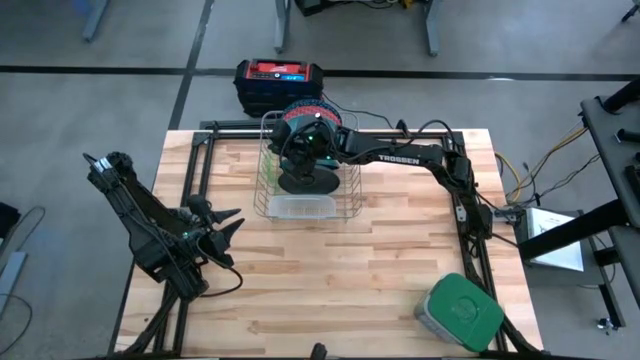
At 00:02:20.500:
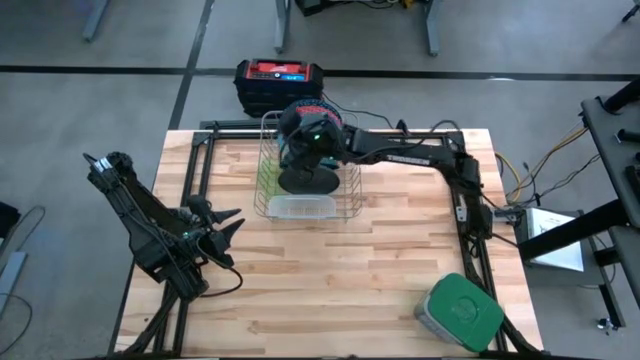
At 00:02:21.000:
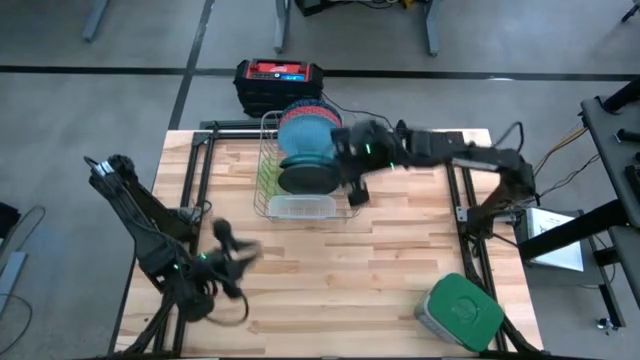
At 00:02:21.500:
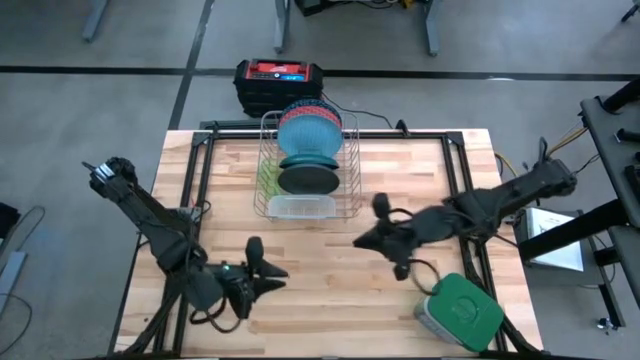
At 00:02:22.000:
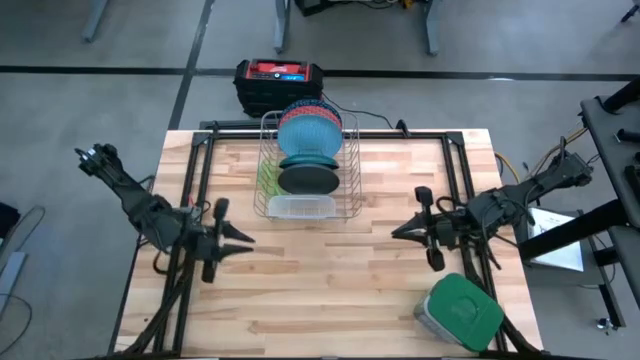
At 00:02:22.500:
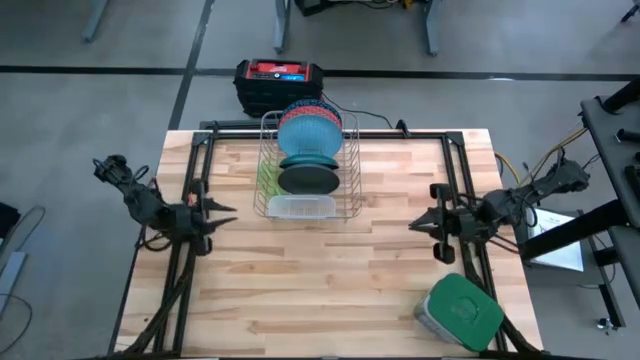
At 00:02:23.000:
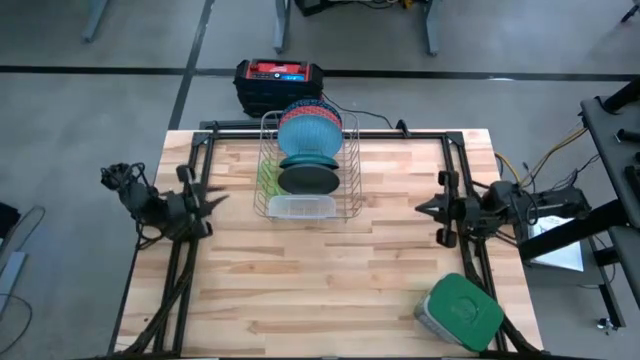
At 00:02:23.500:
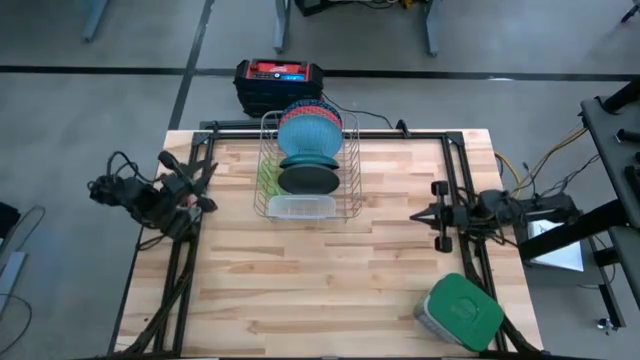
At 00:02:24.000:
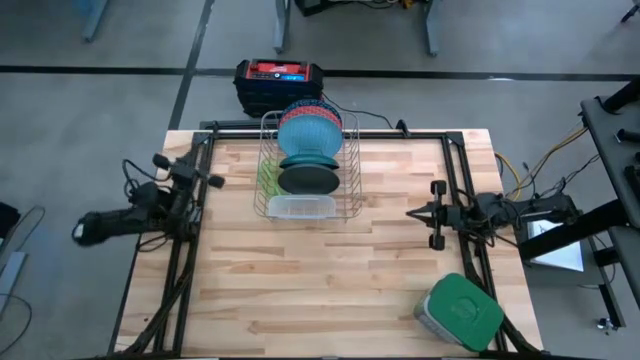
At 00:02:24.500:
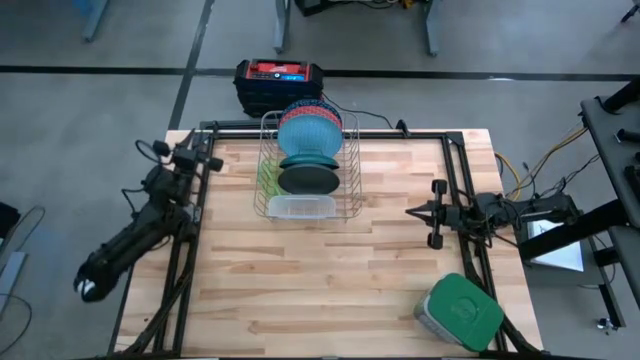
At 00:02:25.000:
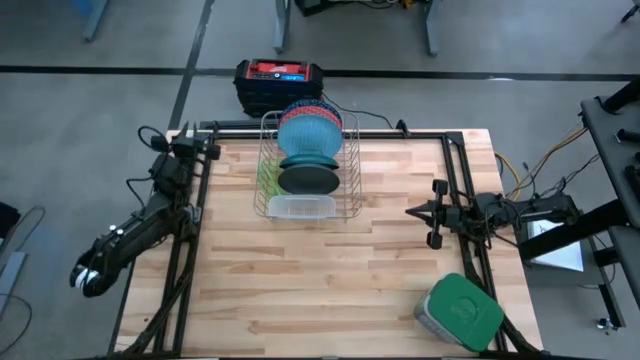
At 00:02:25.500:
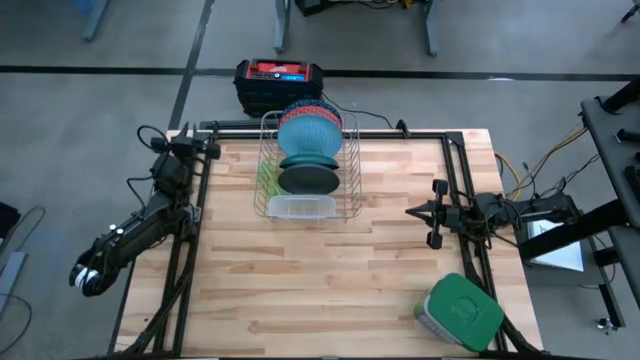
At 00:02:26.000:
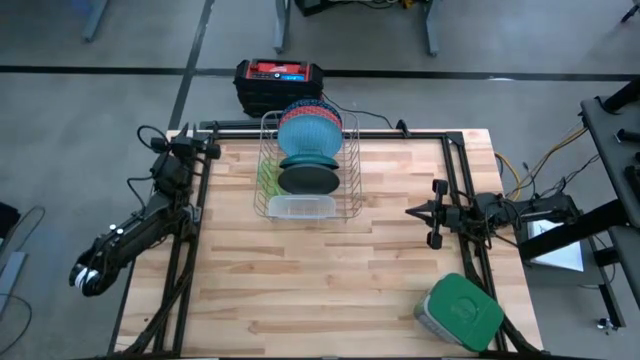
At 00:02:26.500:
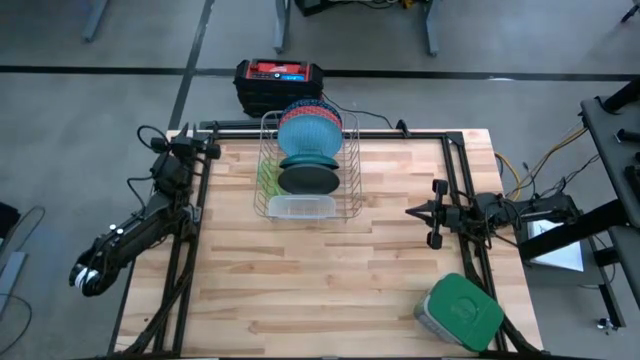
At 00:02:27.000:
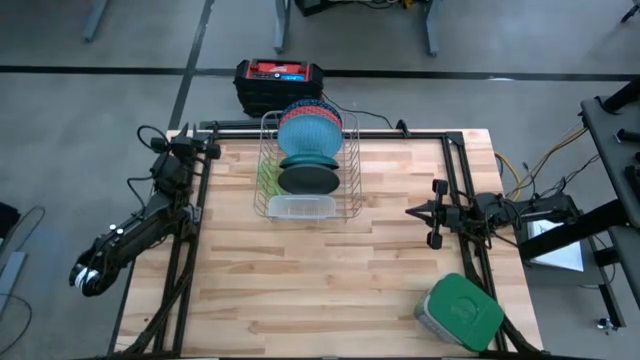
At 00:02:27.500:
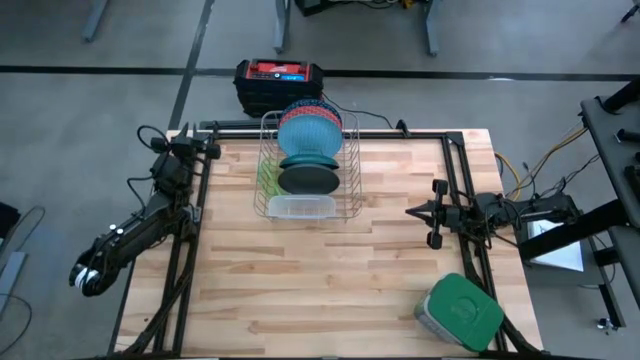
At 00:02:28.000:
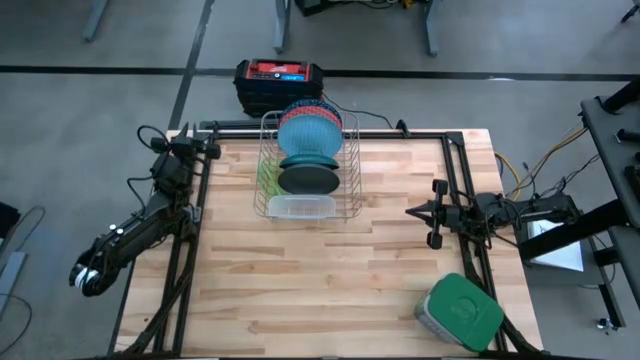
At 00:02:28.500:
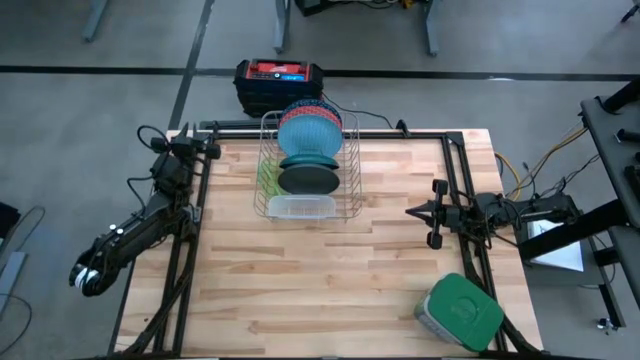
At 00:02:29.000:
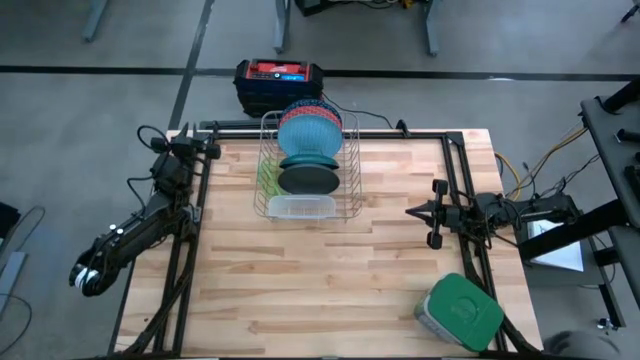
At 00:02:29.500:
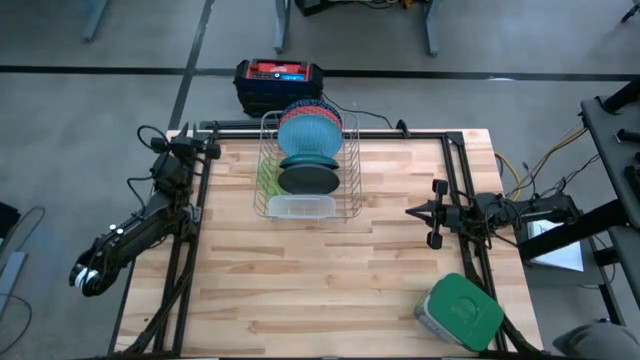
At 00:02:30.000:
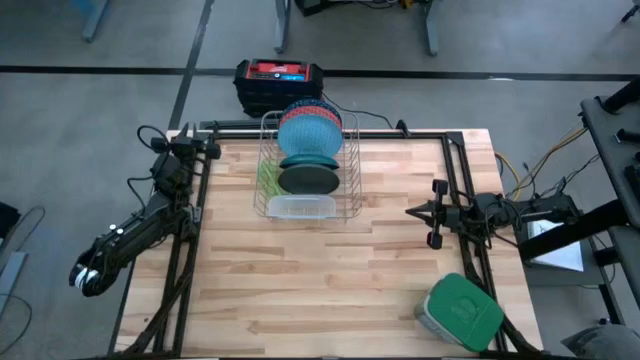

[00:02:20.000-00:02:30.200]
Task: Sort dishes
Return to Home Position

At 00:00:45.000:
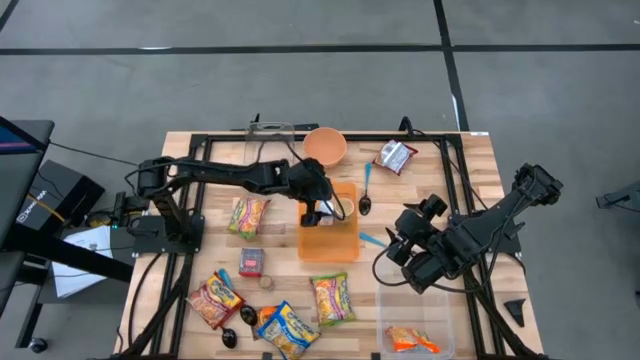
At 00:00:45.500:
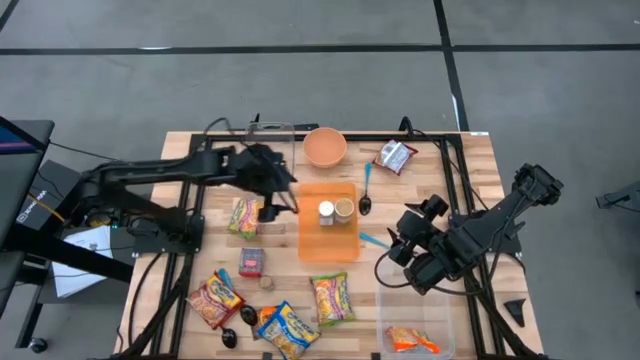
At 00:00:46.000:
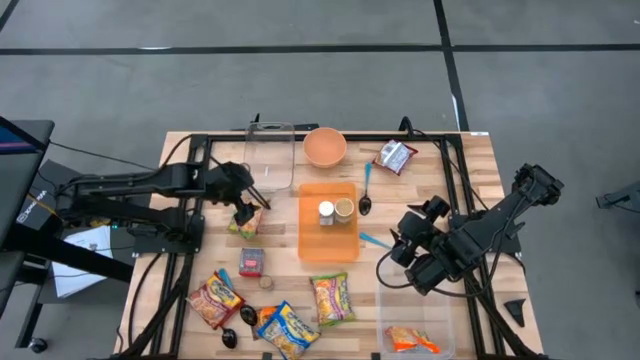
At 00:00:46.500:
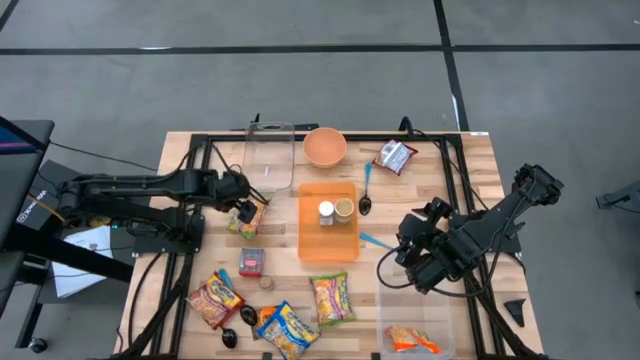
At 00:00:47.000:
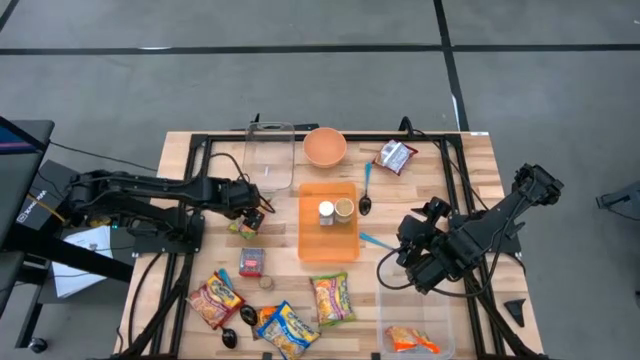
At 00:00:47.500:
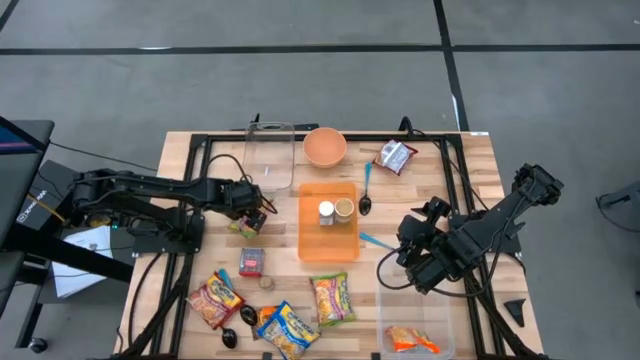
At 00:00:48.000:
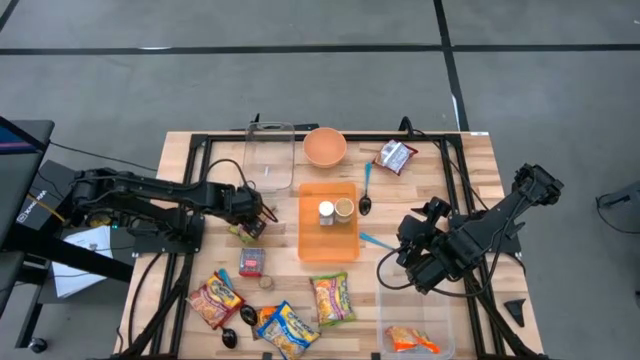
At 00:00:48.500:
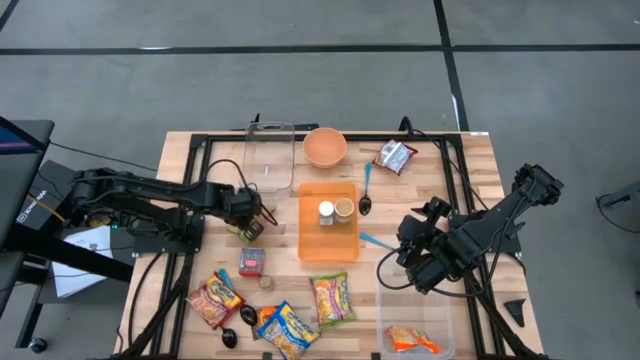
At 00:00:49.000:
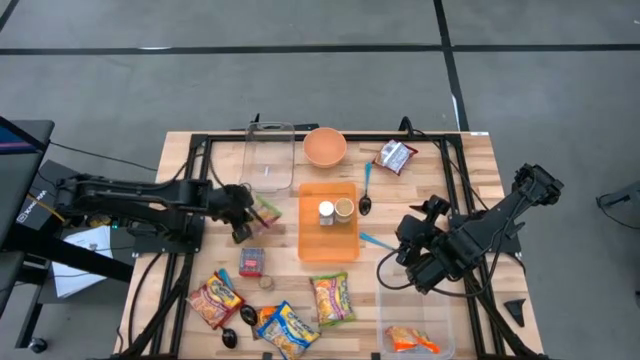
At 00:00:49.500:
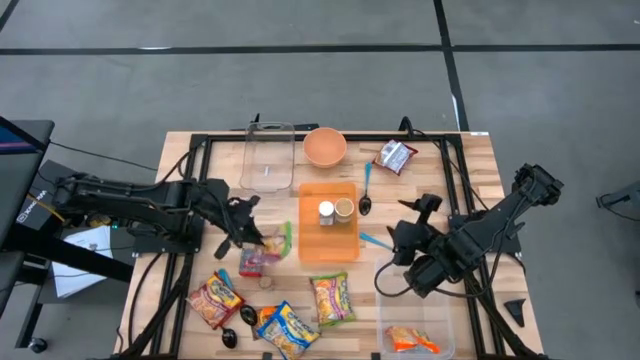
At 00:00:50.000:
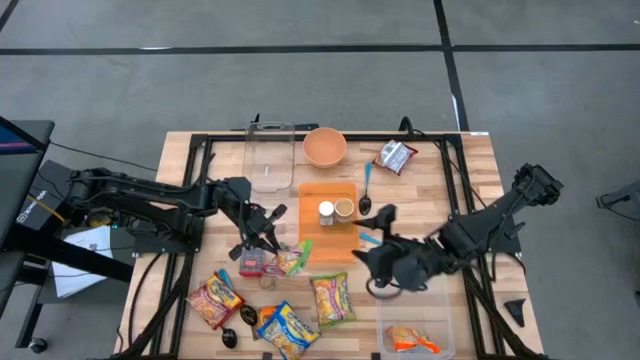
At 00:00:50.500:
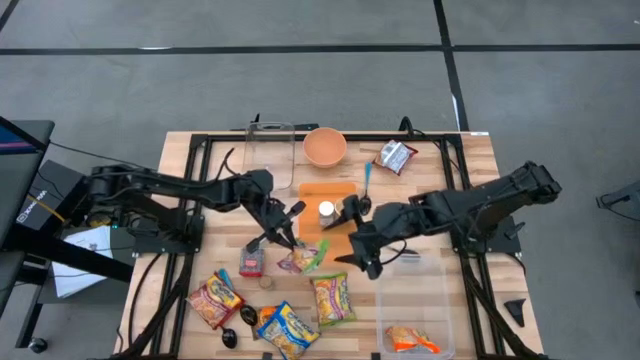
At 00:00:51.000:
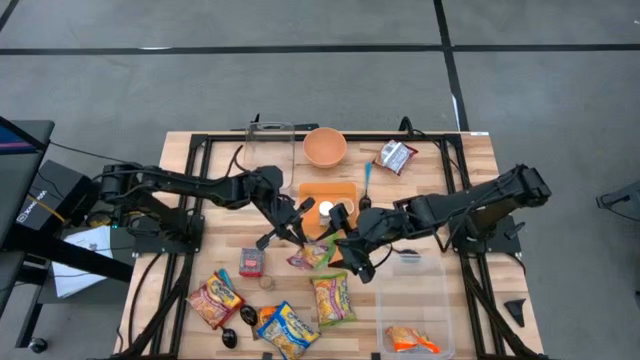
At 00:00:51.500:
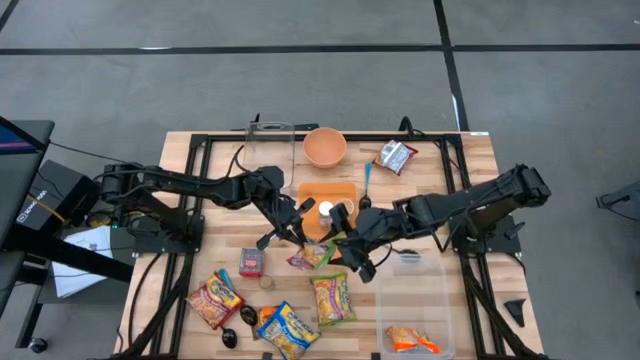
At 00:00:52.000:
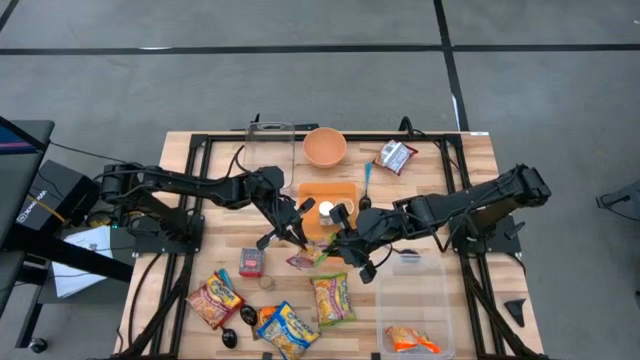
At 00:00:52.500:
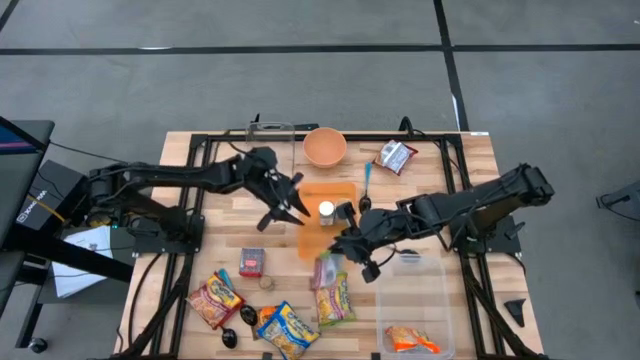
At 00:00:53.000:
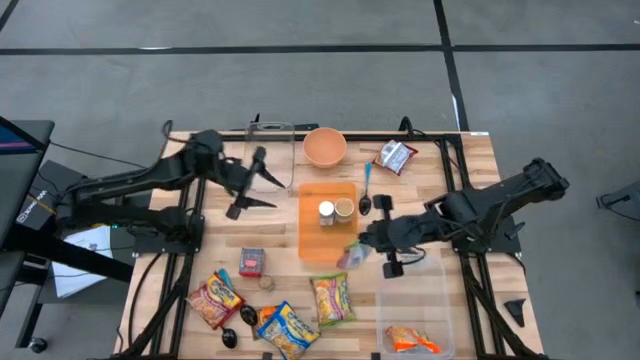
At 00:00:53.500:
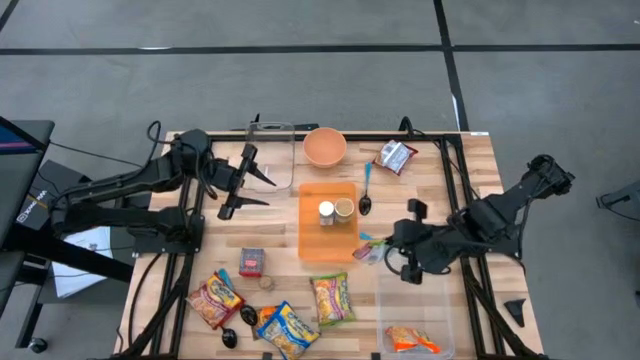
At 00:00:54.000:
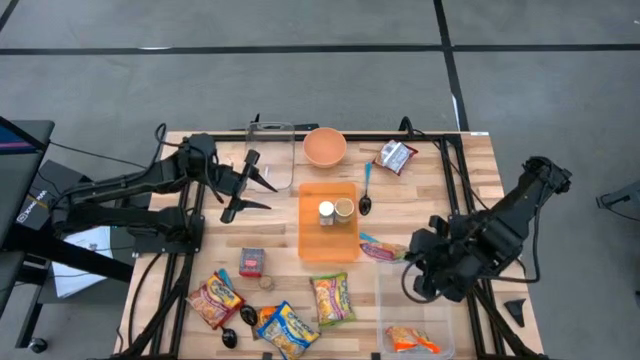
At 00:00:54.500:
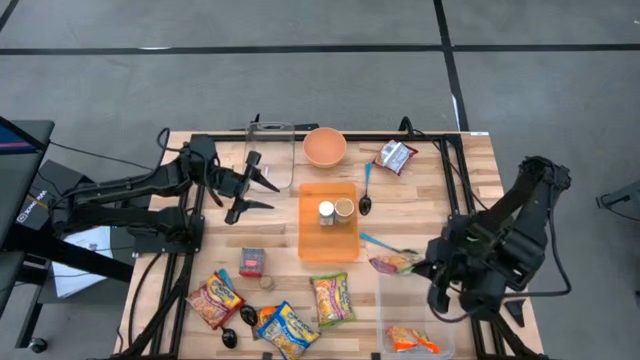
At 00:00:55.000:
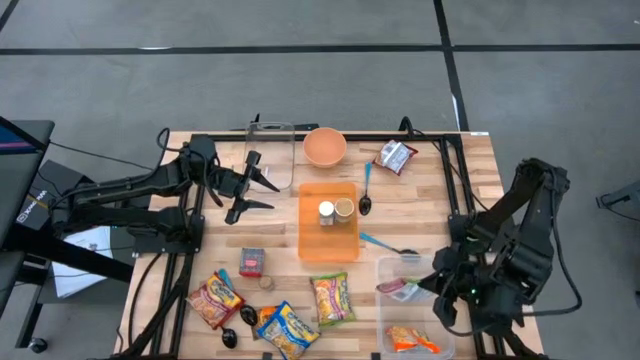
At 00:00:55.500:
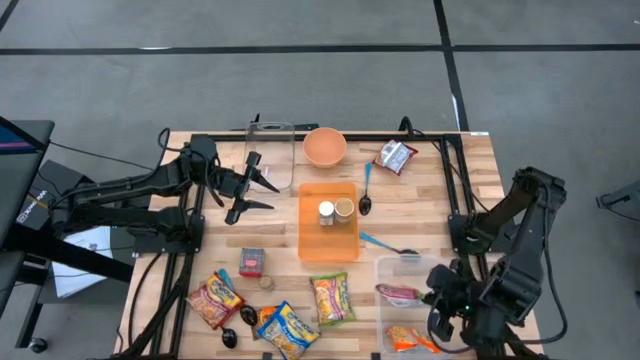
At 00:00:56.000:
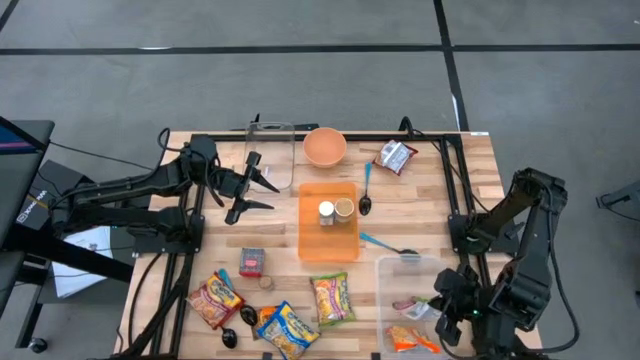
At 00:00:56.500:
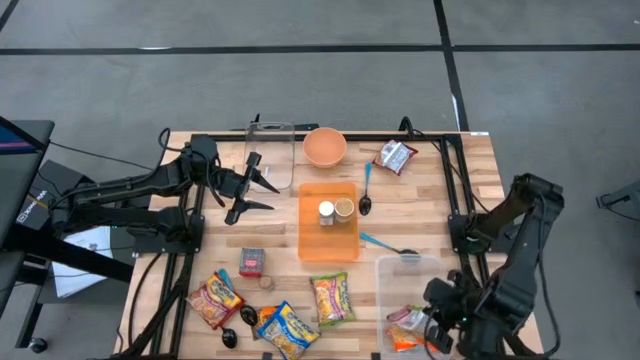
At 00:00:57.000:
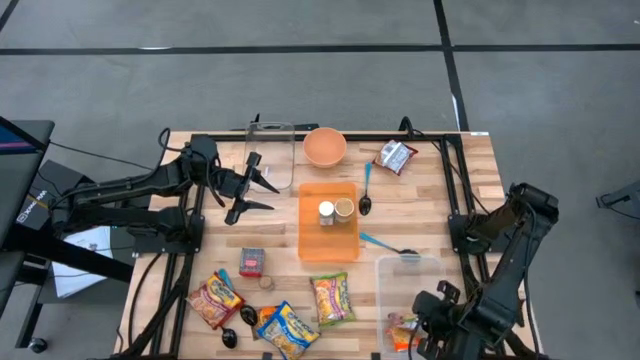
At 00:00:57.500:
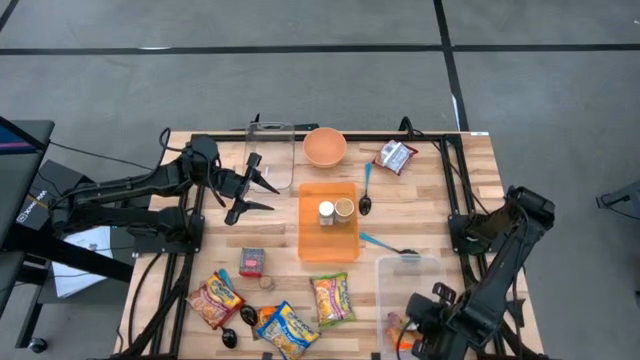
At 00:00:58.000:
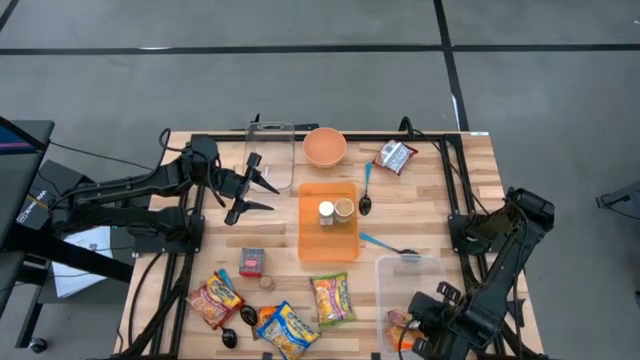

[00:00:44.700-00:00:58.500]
Task: Pick & Place Food Item
Put the green noodle pack into the transparent container
